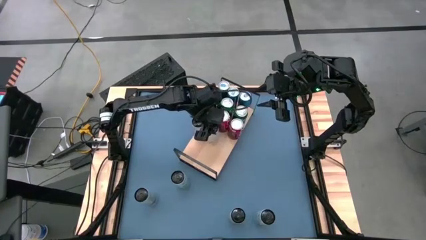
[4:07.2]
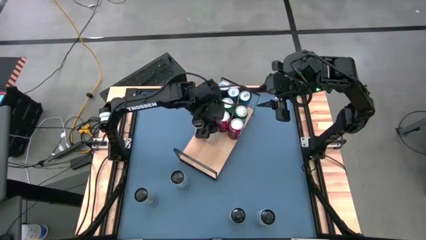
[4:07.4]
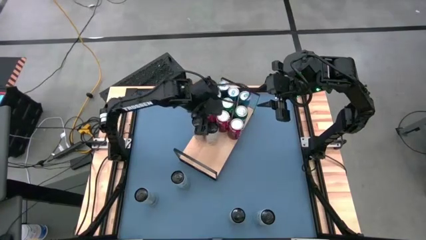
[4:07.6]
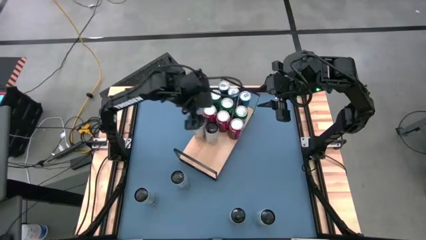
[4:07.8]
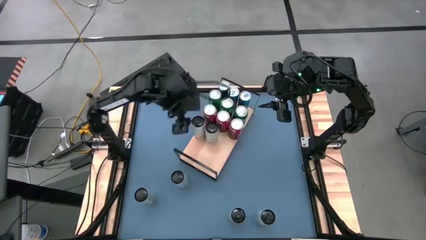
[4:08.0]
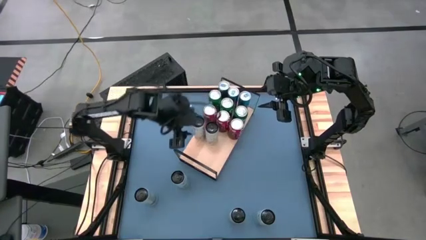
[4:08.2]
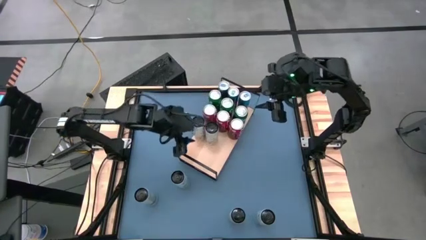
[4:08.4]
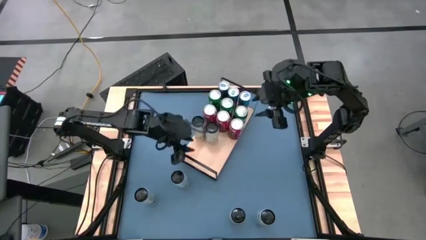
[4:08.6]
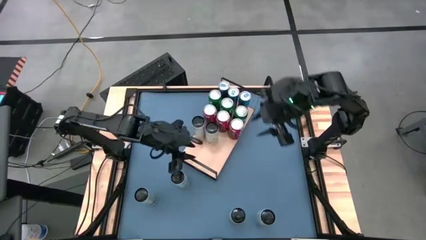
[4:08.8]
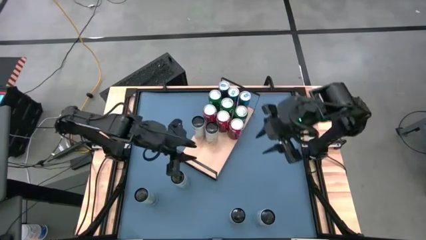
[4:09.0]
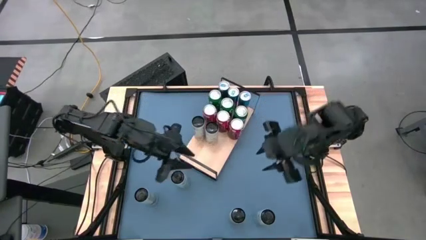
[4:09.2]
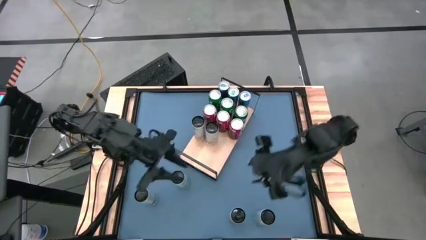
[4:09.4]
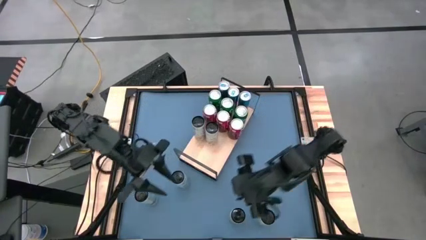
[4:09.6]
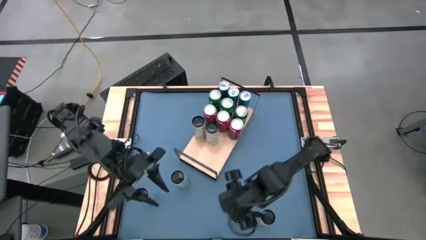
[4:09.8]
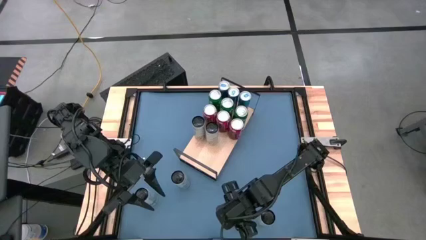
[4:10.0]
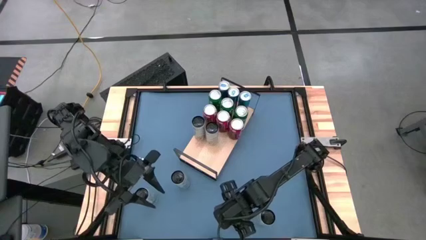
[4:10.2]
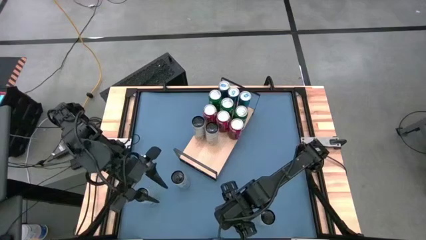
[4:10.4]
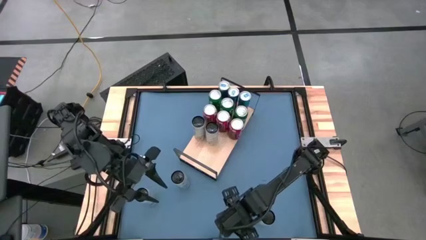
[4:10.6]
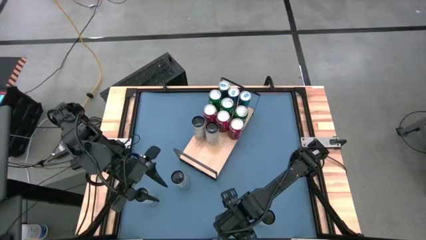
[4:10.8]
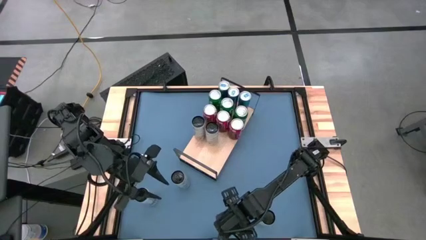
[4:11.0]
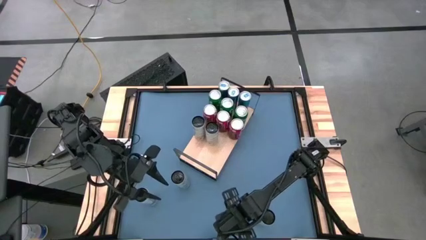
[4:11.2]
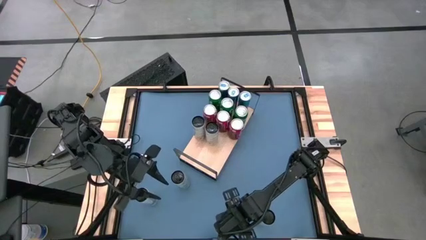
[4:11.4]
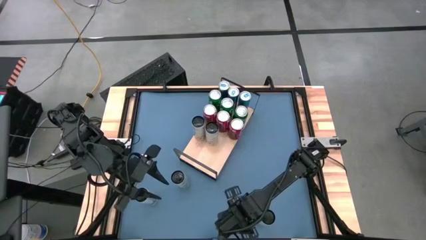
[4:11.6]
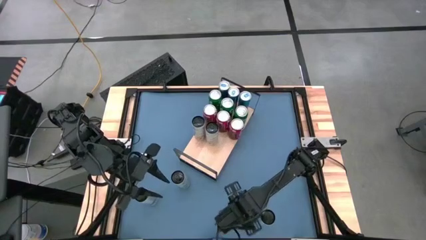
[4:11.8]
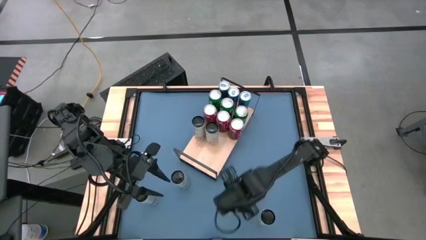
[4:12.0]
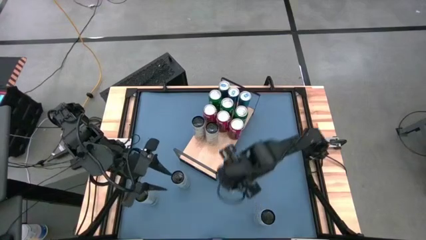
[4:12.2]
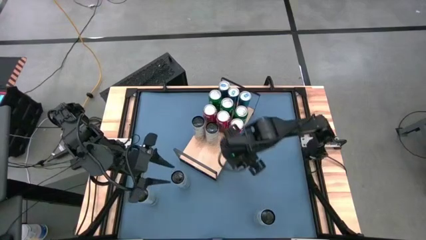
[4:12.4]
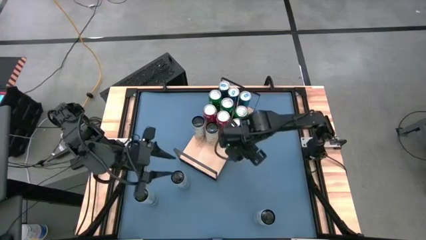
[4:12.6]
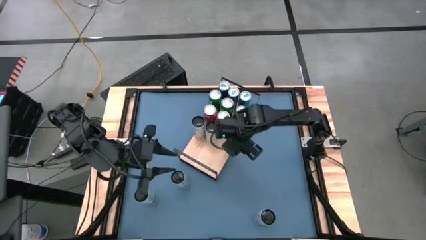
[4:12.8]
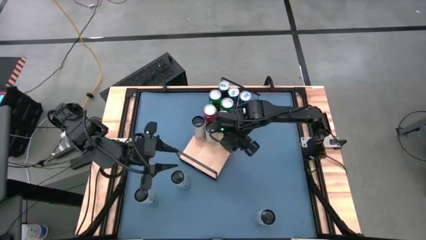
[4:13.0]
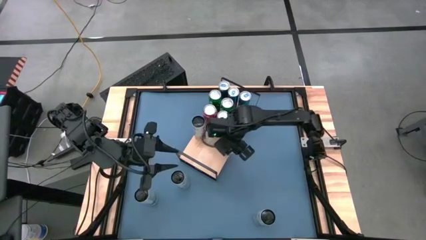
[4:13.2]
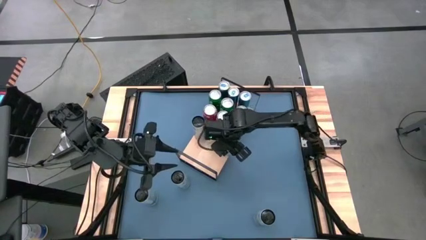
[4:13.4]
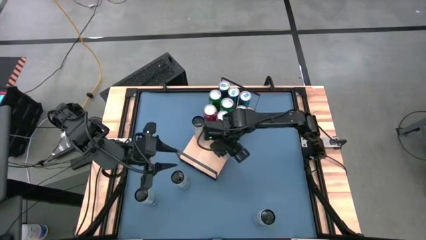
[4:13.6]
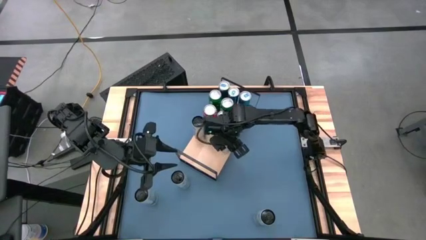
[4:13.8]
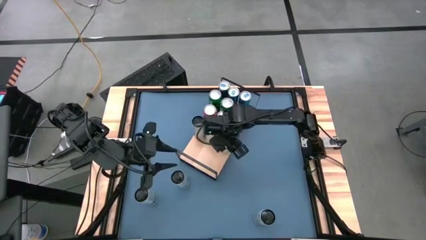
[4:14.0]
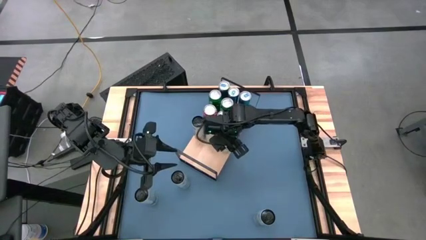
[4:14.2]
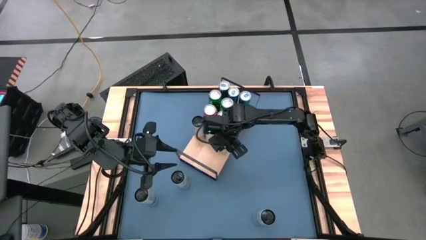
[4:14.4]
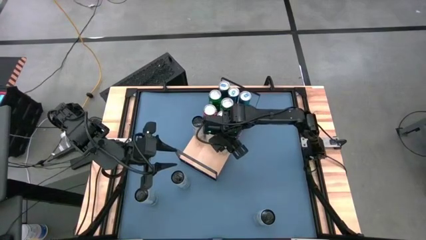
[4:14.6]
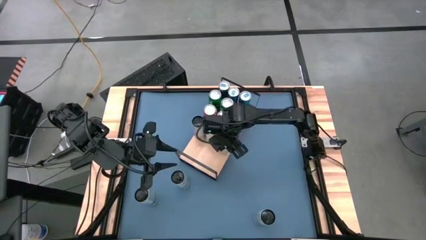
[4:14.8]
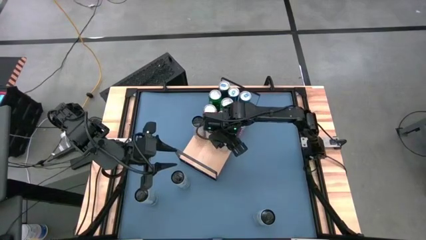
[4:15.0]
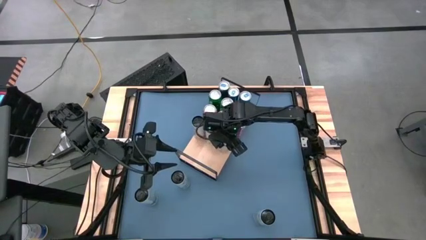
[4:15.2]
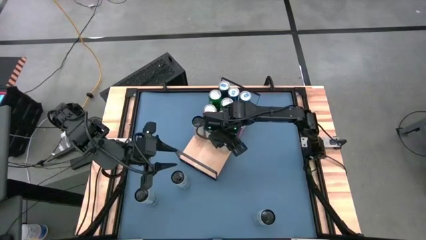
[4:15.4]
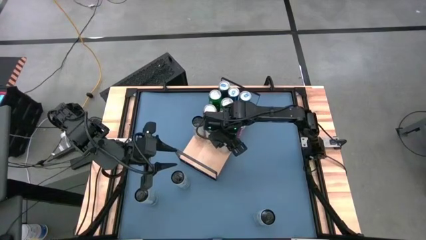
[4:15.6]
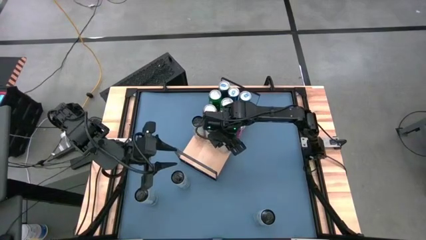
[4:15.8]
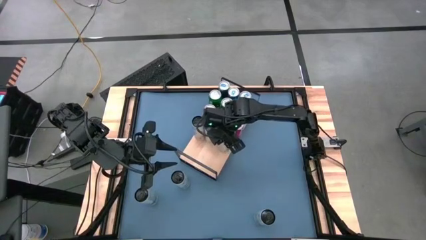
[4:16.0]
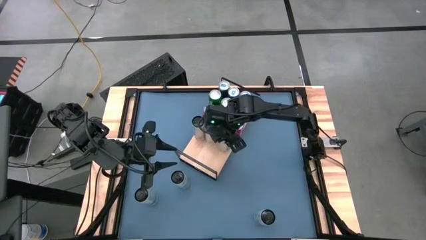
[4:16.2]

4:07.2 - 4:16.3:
Task: Place canned beverage on shelf
Put the right white yellow soda can on the shelf aligned with the other white yellow soda cans

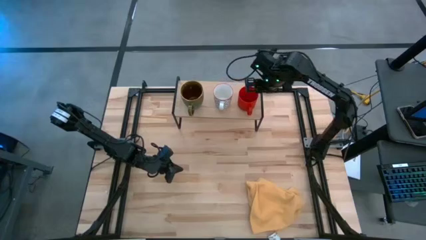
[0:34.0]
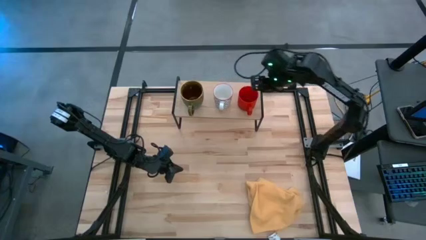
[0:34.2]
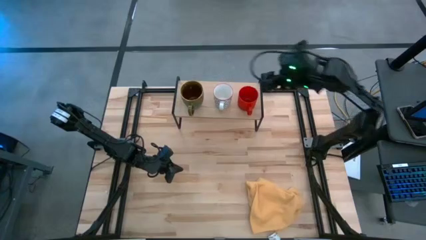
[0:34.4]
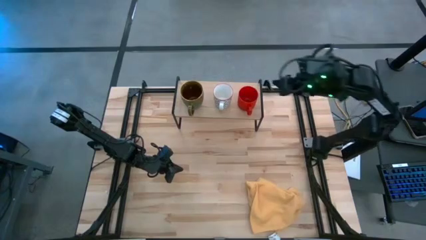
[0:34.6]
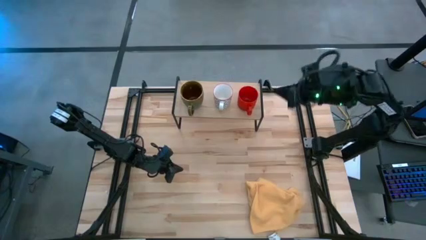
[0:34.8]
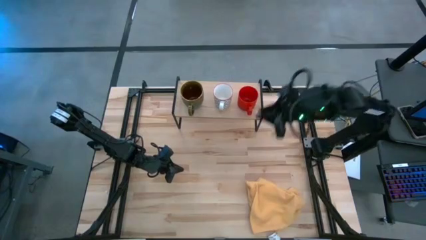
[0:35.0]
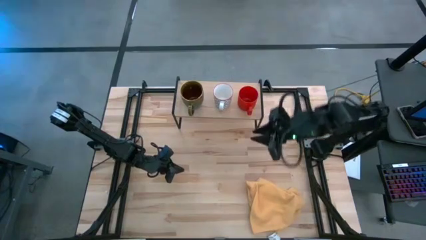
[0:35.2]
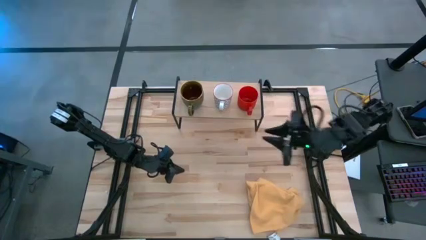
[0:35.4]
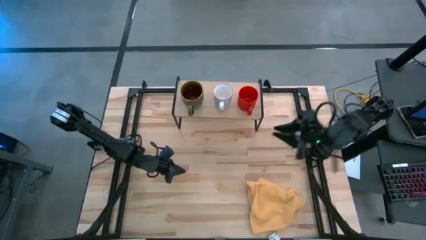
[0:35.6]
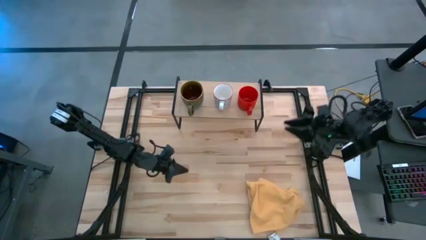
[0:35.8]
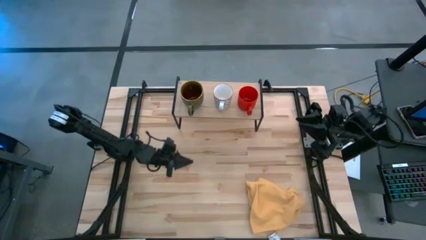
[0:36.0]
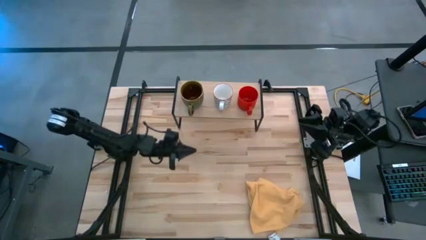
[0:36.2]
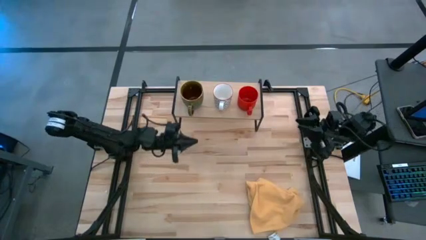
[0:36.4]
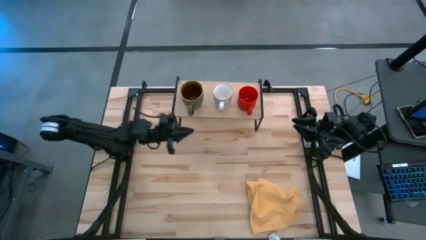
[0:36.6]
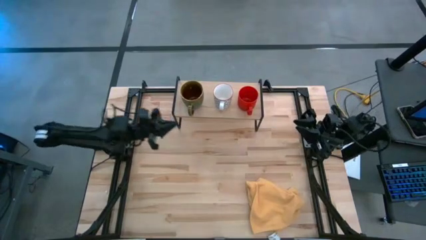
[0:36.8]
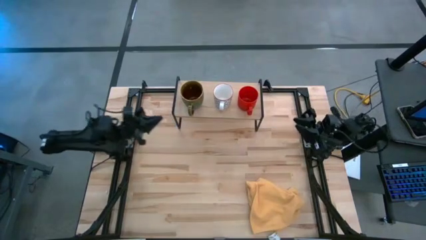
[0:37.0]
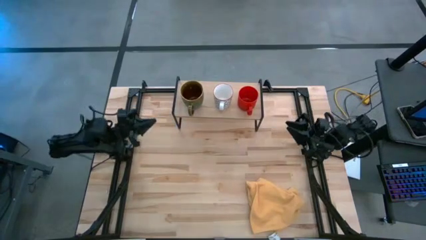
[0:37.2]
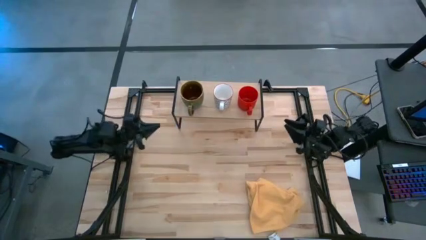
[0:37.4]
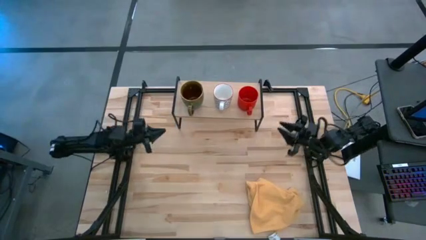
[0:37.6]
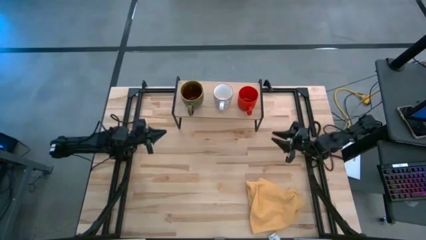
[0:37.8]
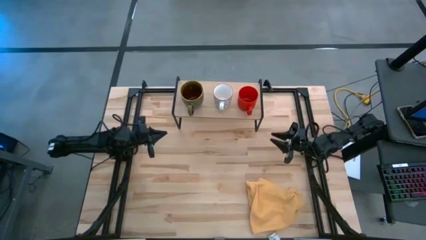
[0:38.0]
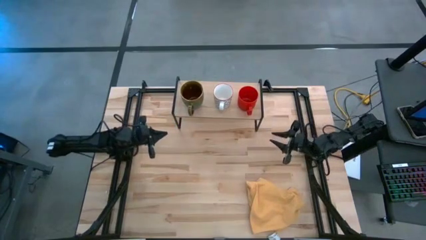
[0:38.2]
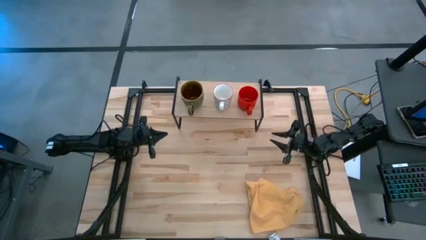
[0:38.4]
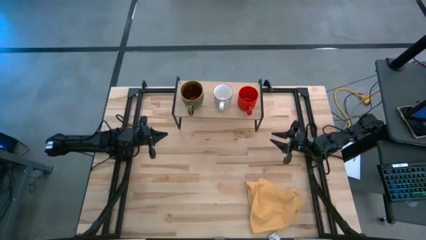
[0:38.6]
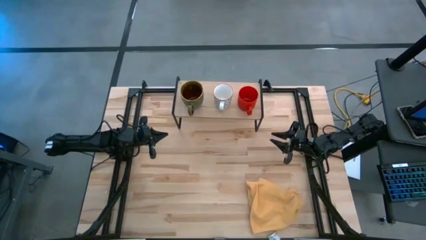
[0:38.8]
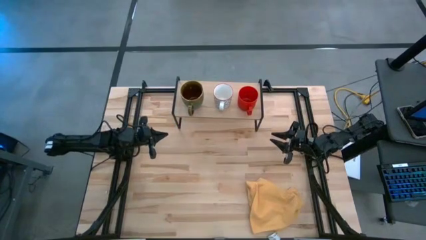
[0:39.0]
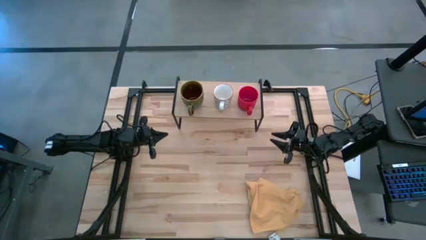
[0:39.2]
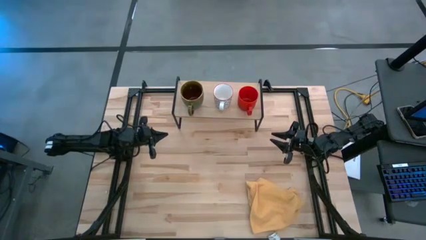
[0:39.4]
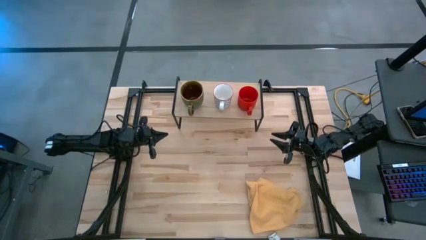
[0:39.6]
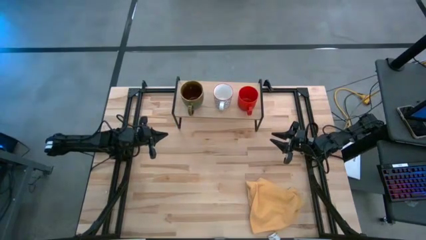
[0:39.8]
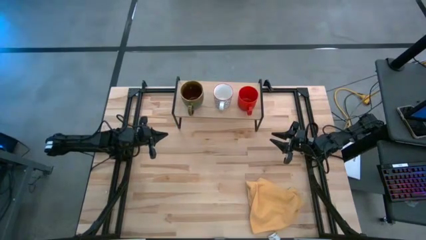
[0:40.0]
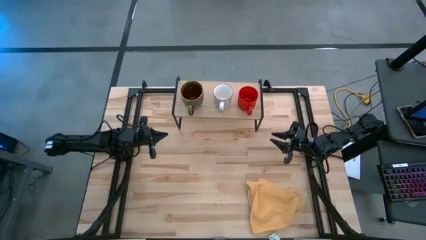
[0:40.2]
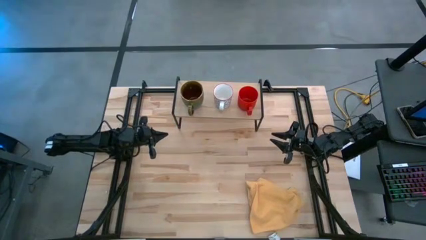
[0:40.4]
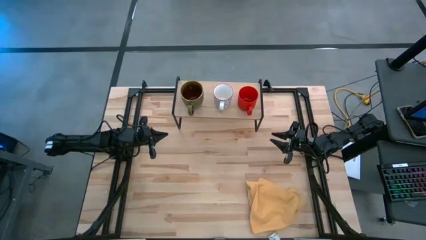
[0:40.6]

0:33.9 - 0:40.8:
Task: Stack small to large cups/mugs on shelf
Return to Home Position
